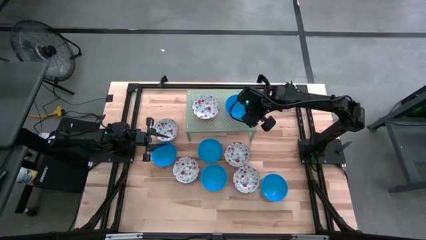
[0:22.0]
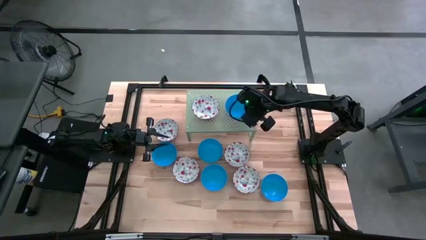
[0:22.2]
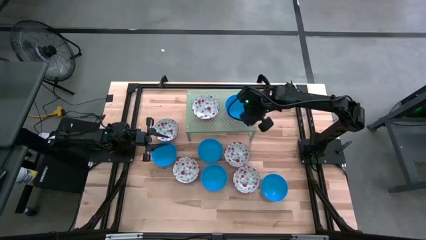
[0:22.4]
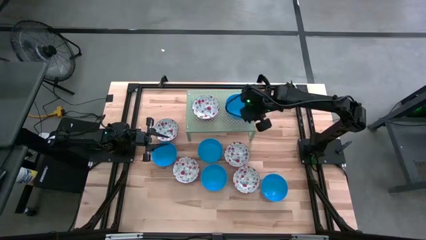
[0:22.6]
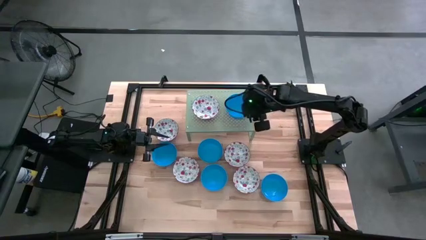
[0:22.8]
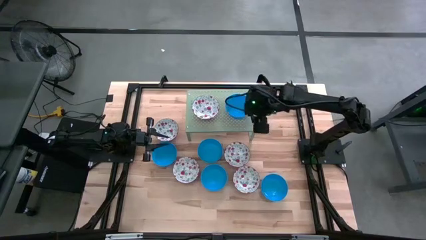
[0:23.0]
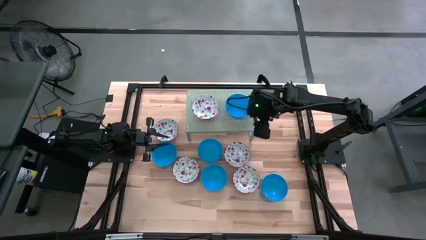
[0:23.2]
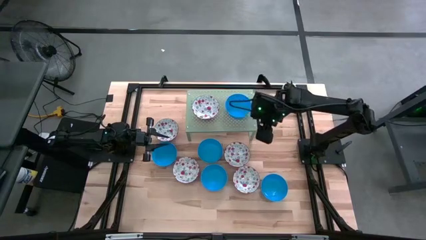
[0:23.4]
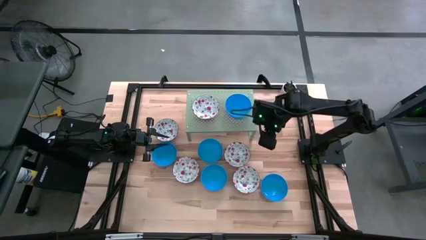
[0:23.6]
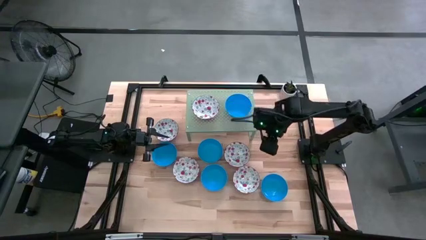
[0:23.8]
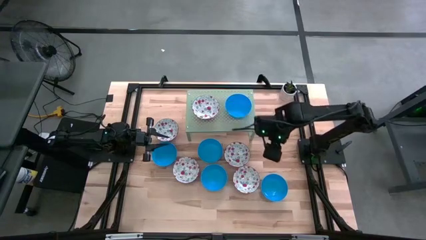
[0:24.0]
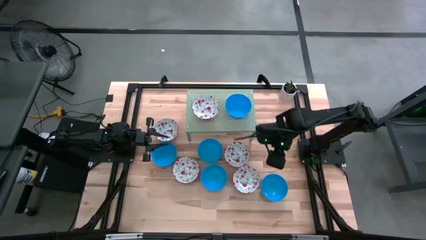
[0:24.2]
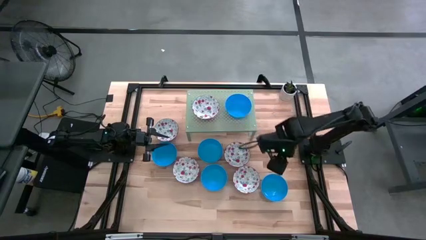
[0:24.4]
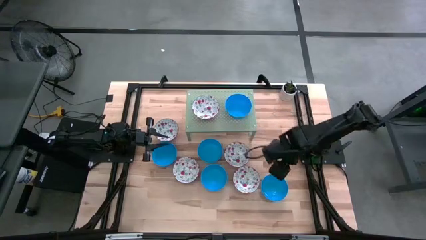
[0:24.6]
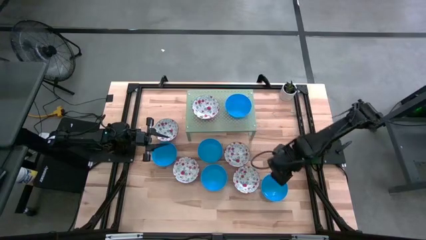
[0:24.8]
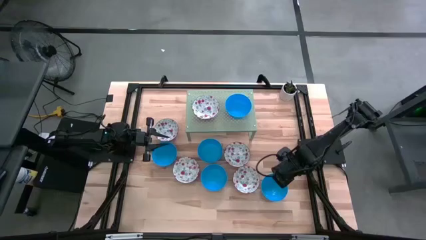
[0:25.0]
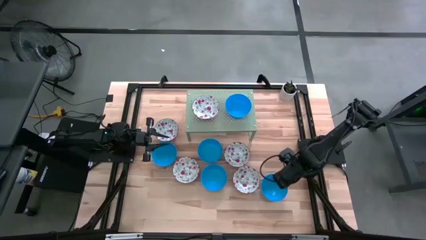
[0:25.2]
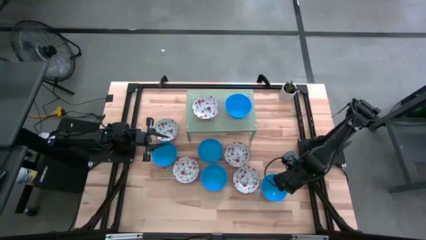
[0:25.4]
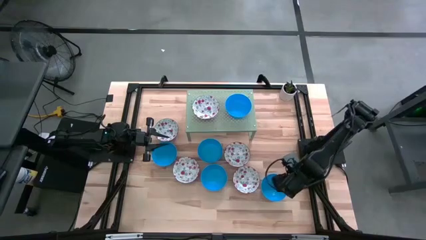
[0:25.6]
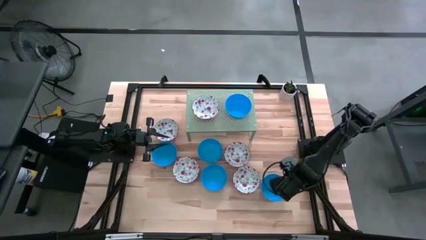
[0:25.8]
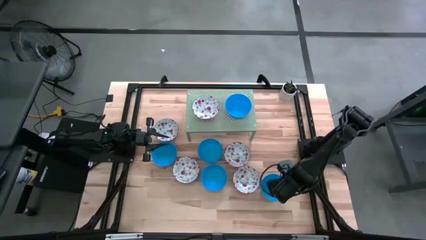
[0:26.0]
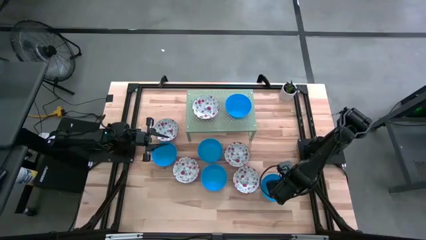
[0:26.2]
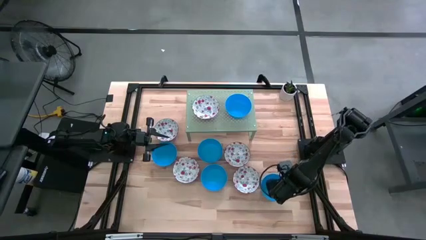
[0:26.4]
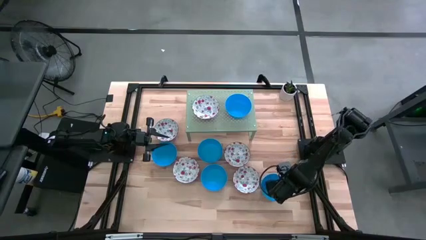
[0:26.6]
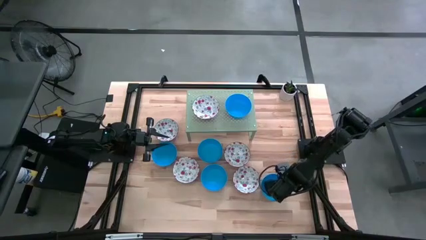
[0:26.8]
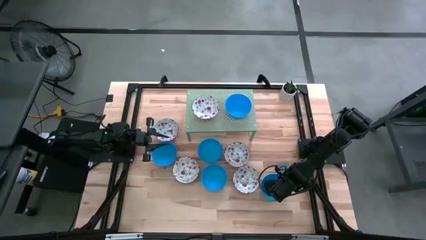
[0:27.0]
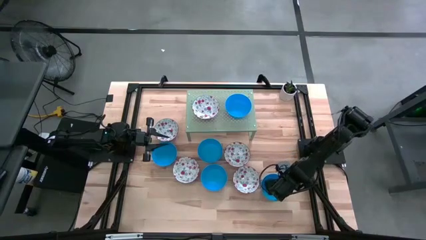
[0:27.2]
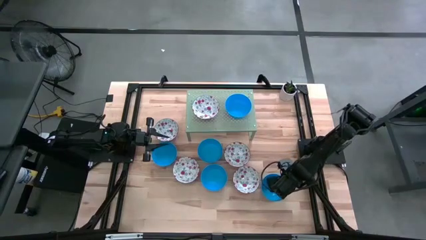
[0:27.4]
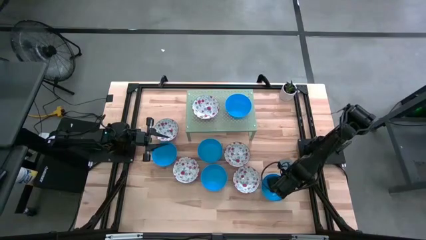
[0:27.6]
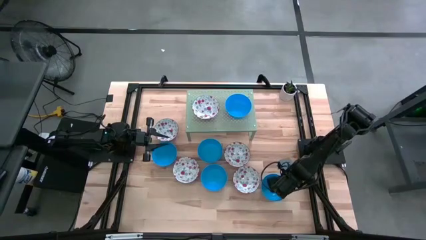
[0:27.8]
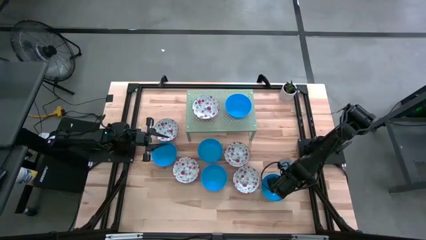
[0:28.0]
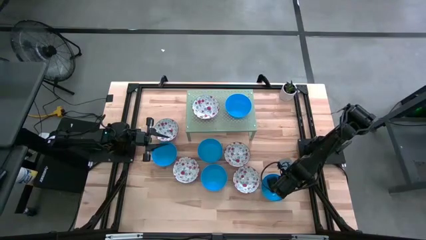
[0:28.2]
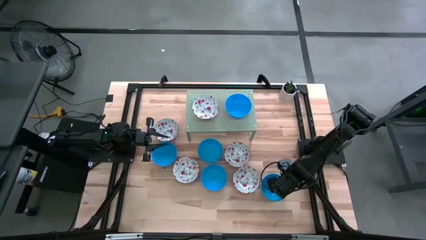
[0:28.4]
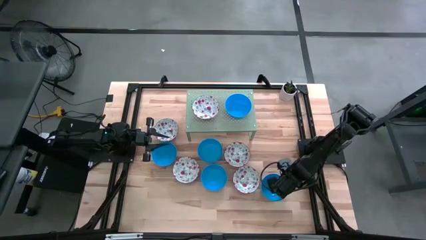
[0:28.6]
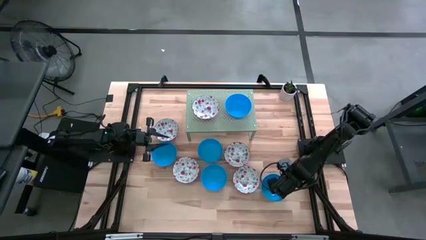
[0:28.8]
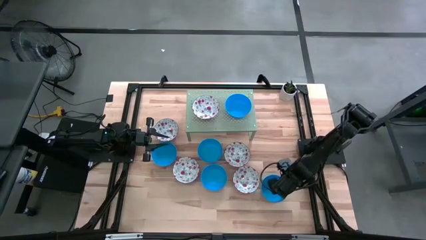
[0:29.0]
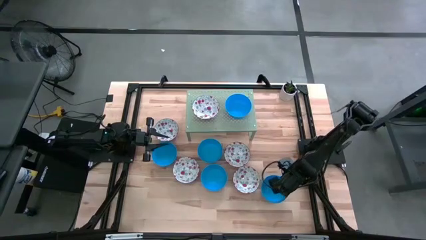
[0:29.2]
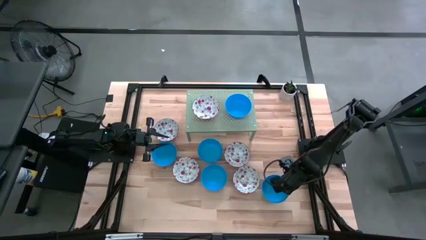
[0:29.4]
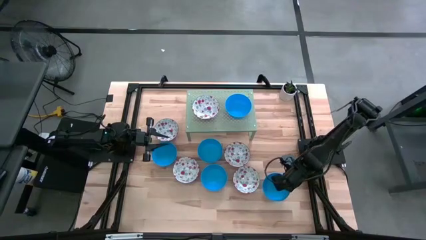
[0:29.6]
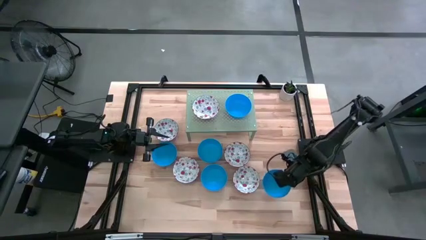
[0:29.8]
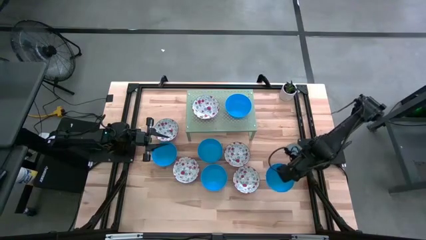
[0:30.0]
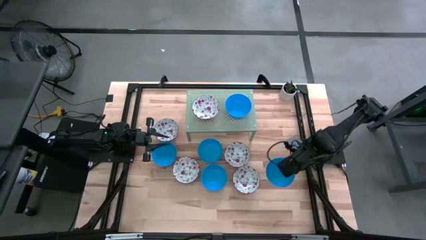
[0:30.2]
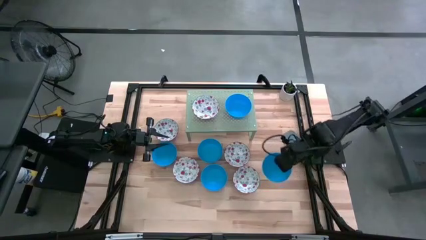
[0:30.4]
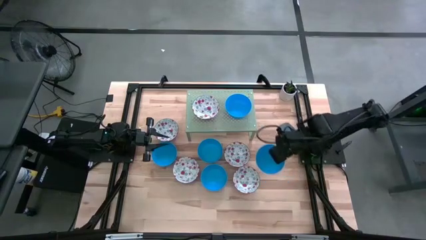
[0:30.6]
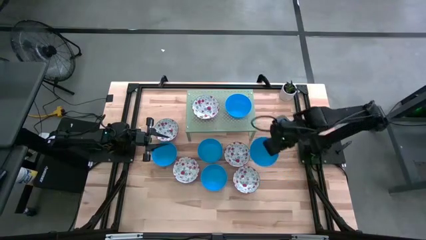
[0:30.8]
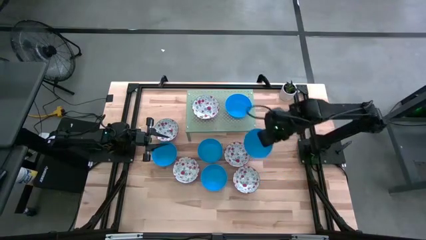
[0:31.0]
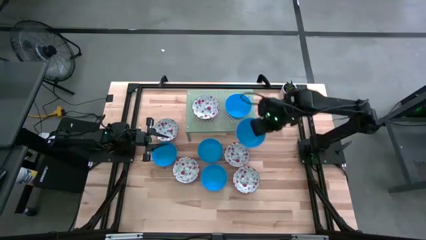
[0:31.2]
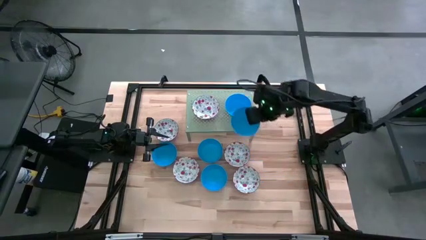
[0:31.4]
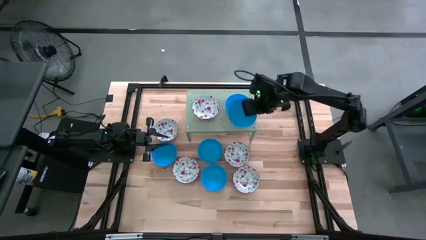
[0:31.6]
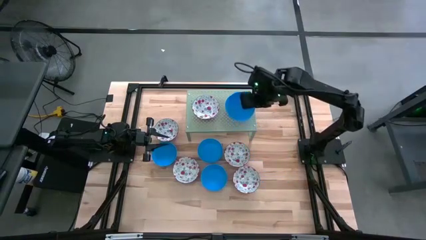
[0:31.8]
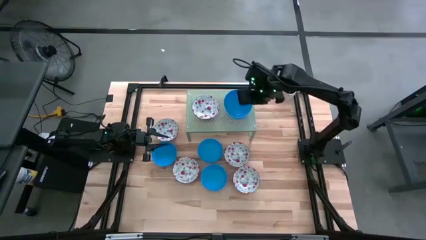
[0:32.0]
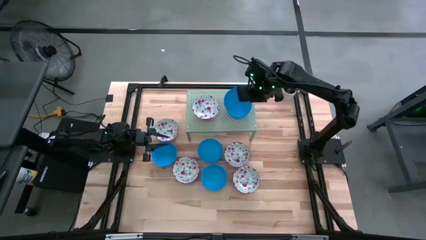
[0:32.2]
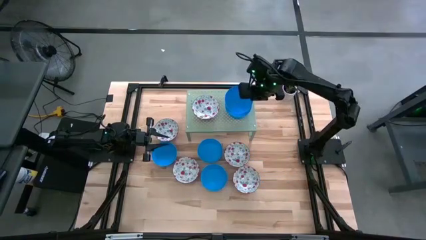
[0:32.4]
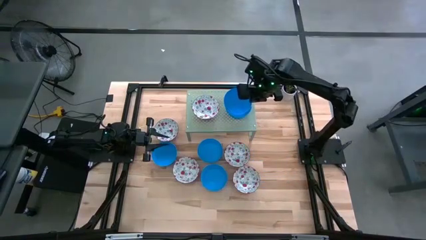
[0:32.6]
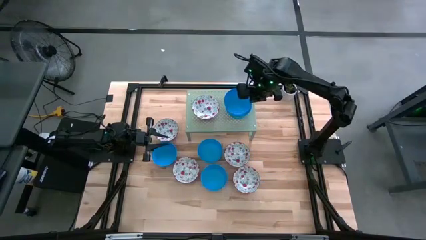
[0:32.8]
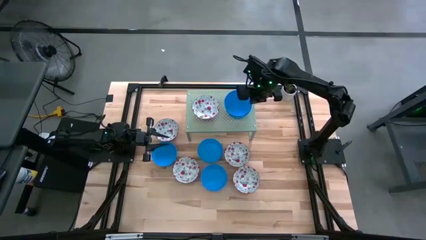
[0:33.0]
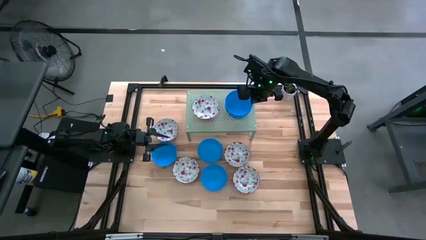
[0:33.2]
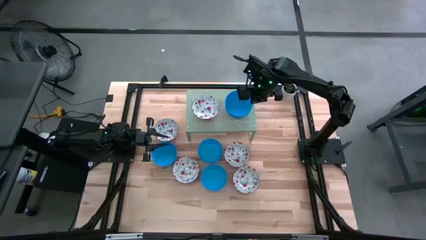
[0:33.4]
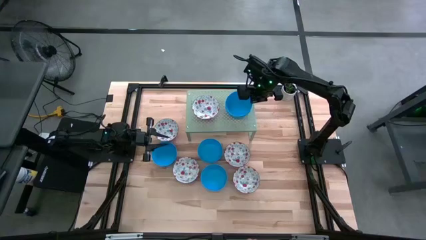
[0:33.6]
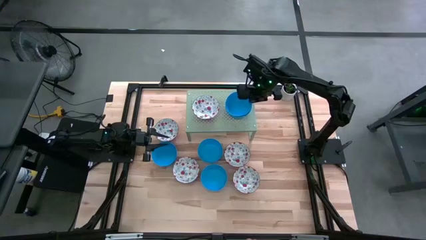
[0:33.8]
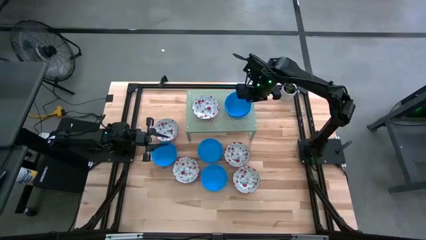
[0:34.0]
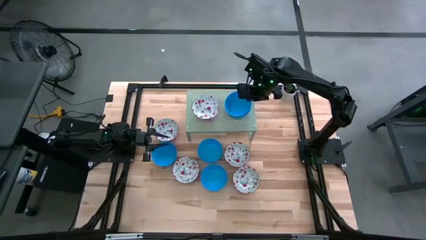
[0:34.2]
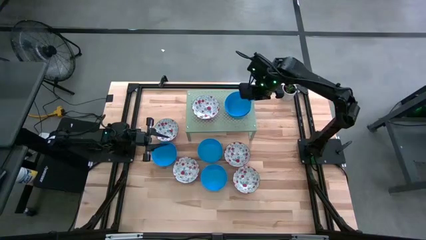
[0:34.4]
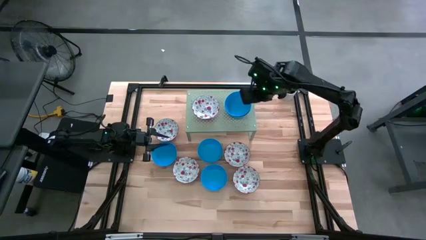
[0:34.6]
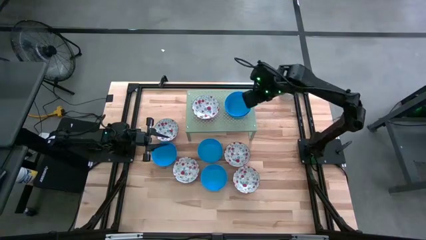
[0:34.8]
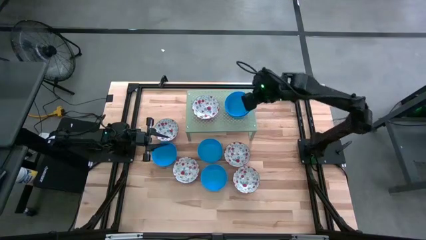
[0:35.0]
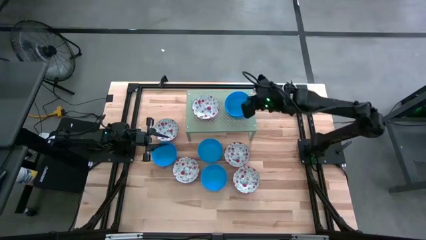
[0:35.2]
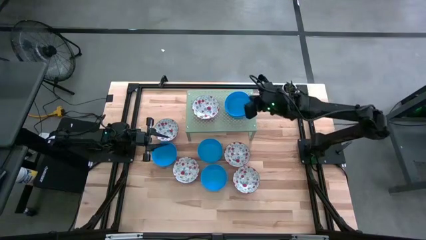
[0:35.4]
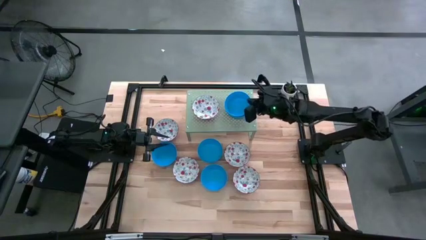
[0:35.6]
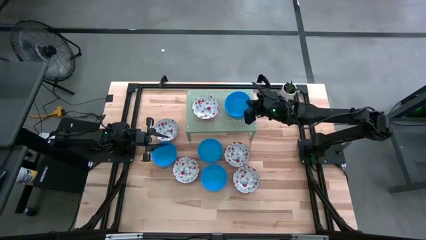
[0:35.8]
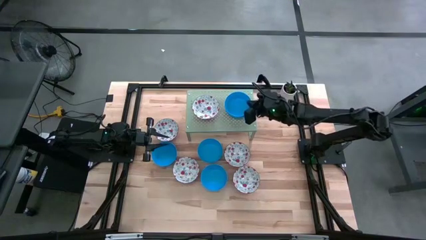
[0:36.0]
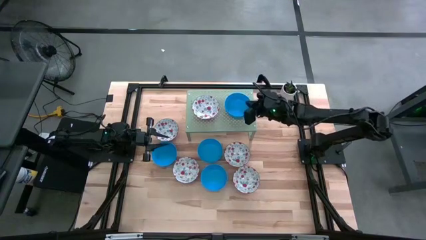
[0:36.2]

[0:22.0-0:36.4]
Task: Pick & Place Mini bowls
Stack the light blue bowl on the light blue bowl on the shelf
